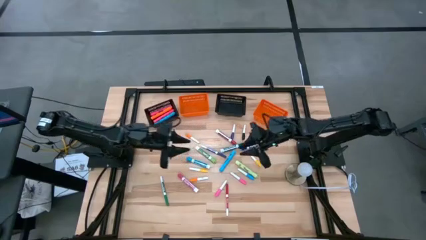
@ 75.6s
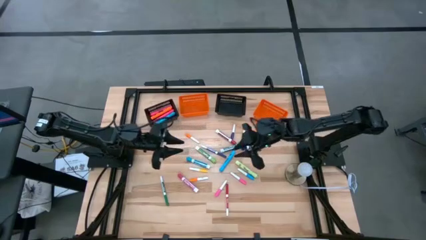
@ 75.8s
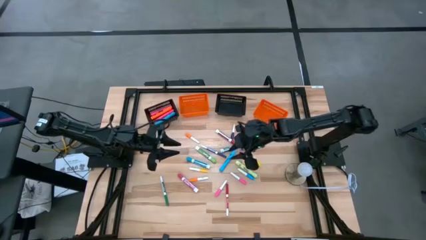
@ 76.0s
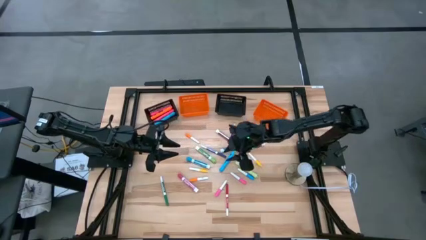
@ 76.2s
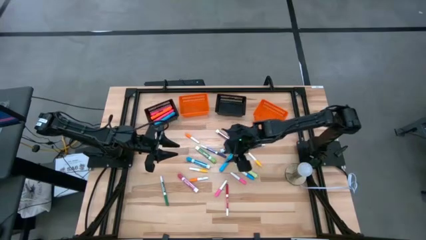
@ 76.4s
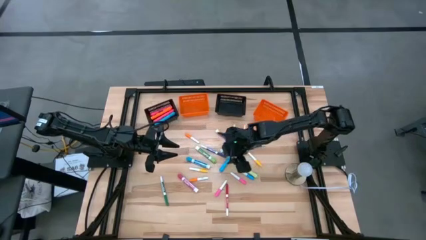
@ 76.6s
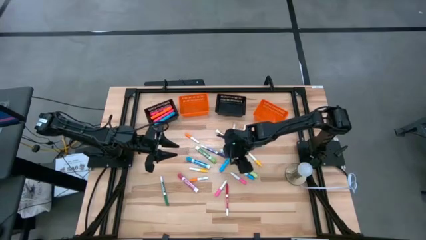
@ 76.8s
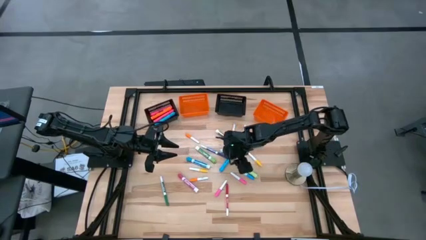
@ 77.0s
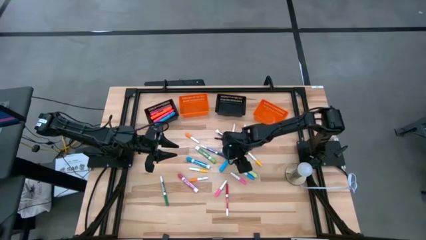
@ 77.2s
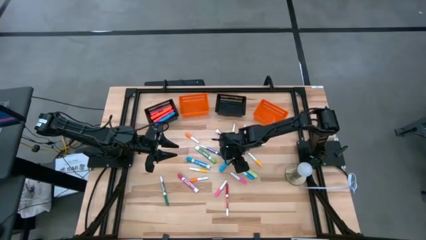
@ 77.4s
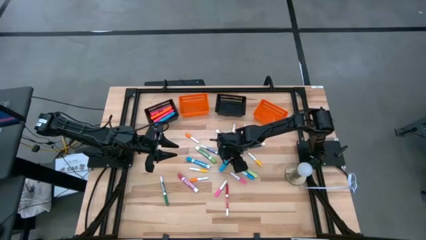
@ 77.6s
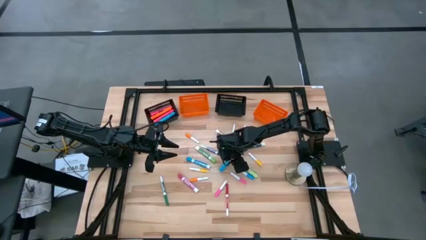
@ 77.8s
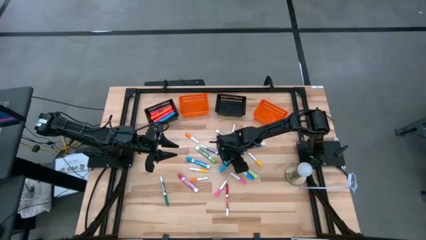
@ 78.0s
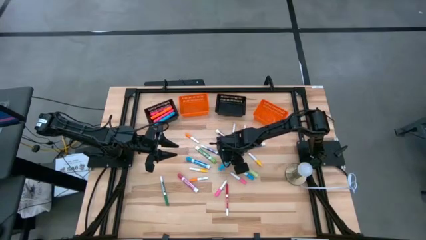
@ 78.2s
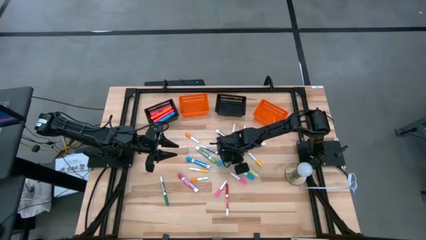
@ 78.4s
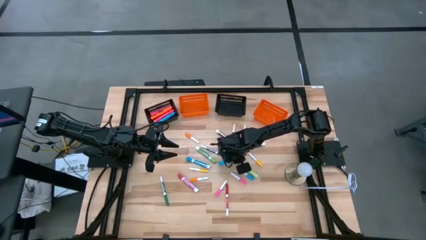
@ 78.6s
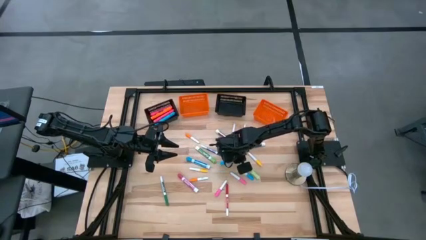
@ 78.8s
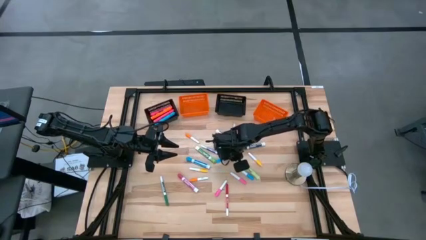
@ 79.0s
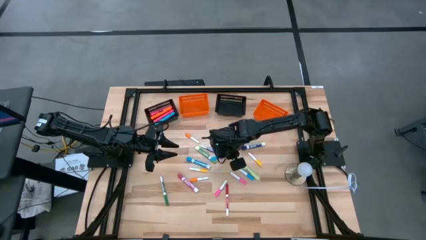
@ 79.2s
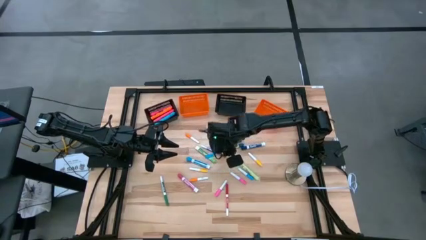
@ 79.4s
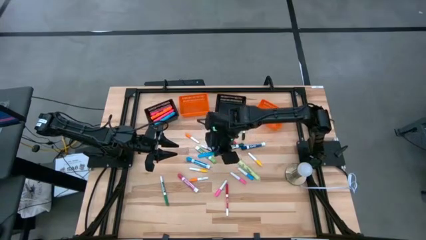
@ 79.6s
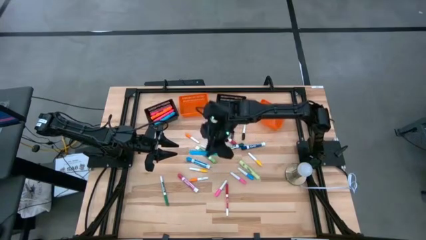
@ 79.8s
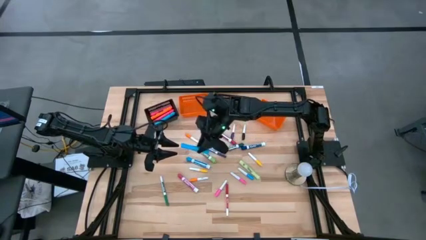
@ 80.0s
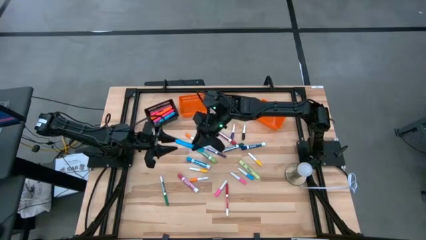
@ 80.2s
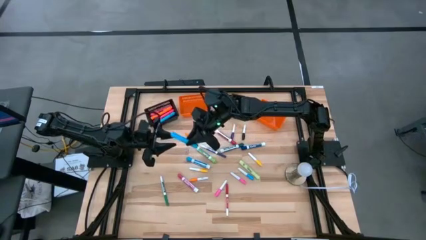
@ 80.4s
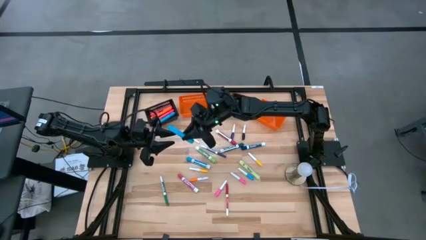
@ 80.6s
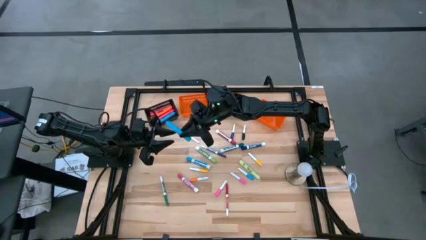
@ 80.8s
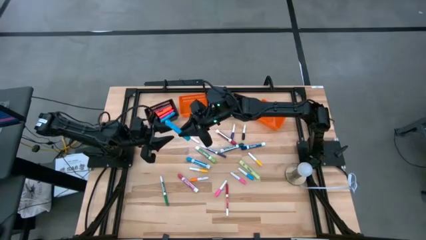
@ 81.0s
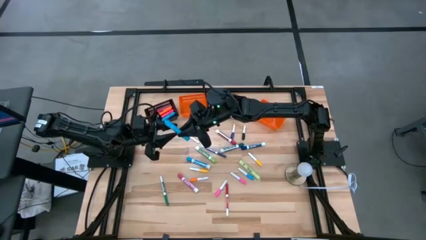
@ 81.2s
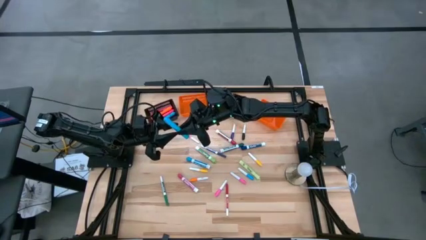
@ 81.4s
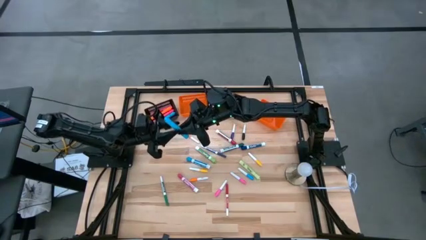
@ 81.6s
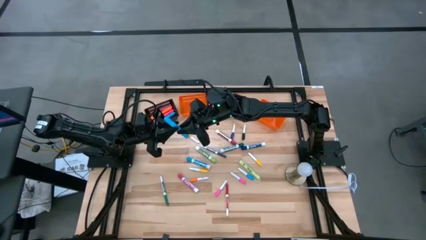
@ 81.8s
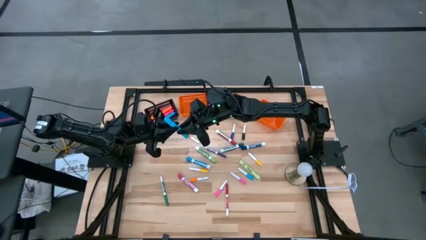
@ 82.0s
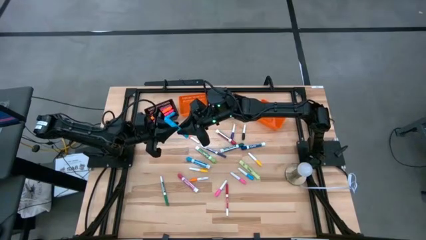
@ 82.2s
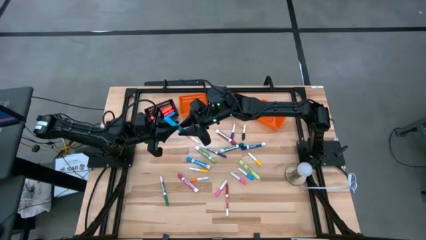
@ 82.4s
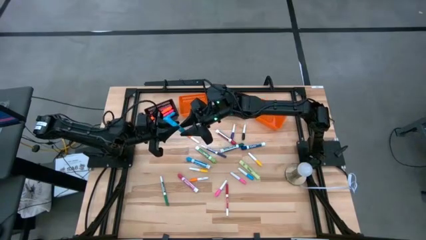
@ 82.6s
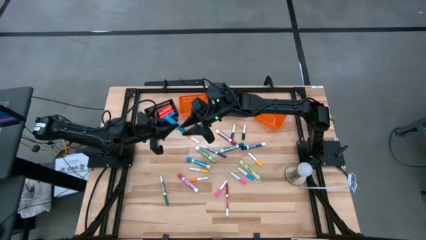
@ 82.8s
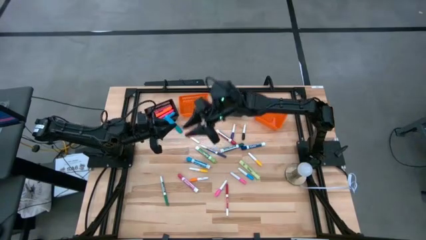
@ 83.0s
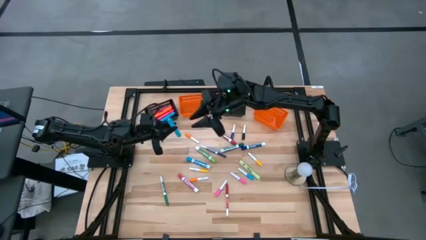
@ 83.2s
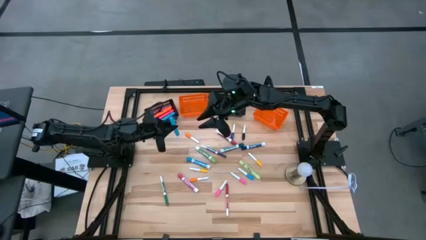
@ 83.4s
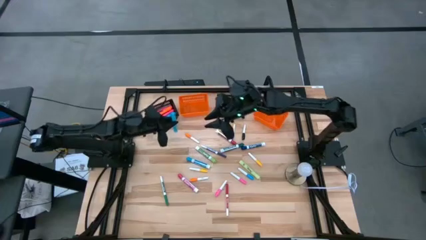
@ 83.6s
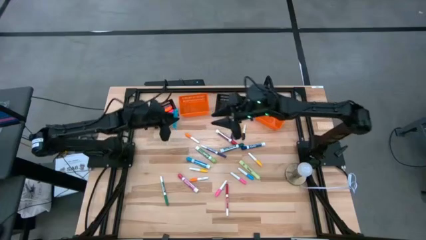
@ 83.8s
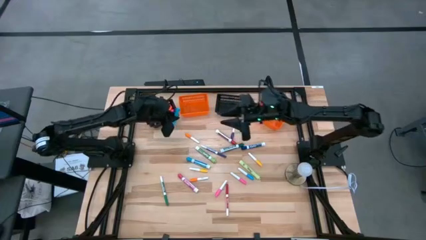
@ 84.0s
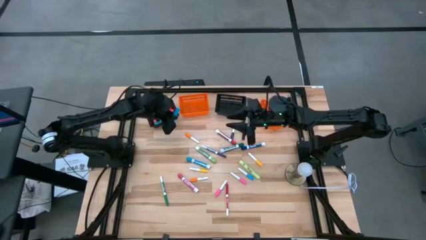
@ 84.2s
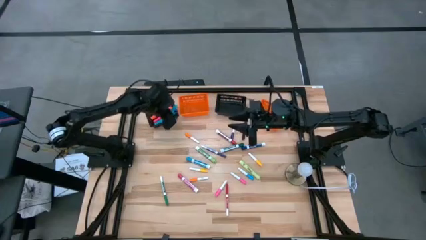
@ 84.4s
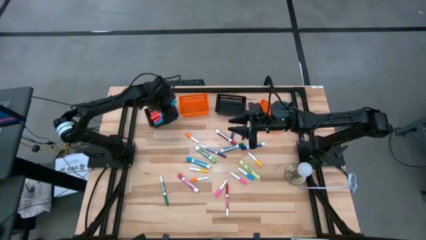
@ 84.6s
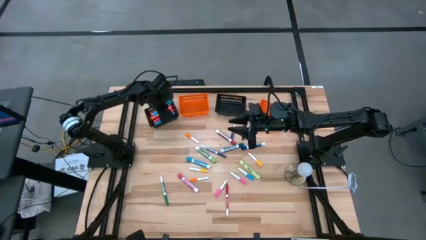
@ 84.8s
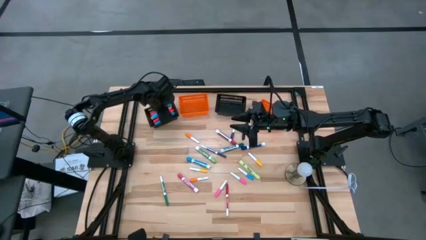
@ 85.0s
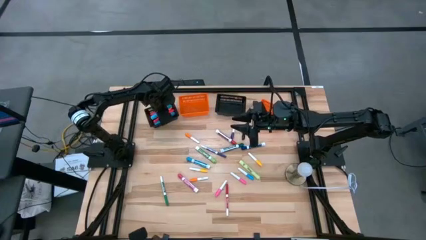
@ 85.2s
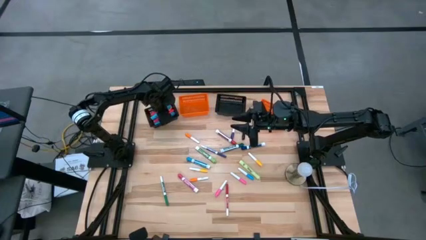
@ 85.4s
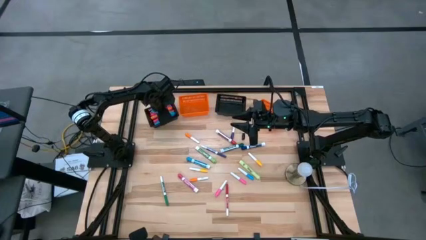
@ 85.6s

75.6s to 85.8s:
Task: Pick & Place Markers
Put the blue highlighter pen into the left black bin

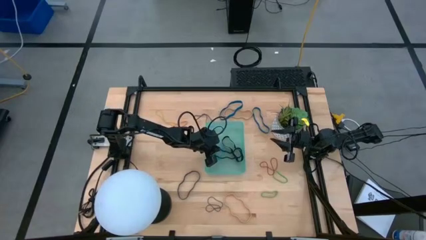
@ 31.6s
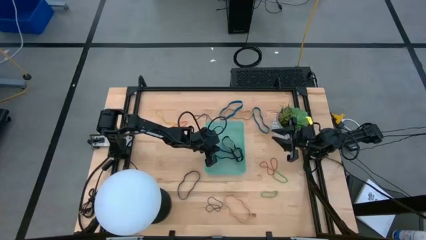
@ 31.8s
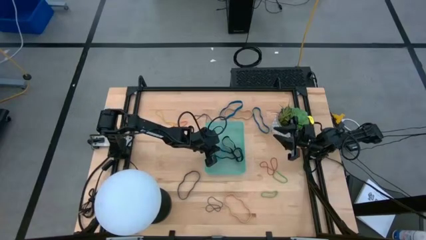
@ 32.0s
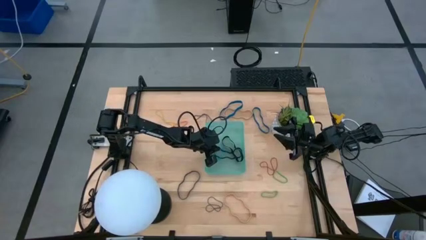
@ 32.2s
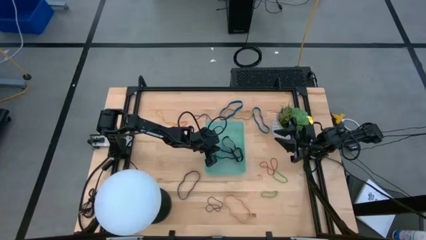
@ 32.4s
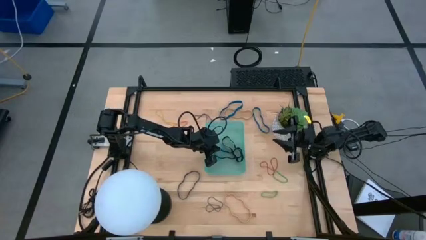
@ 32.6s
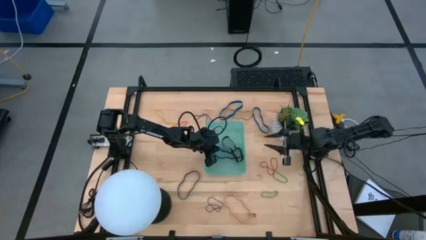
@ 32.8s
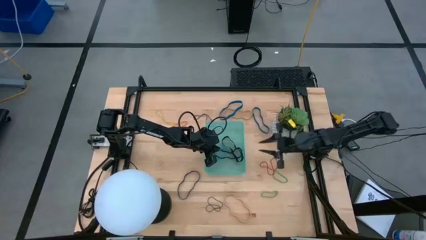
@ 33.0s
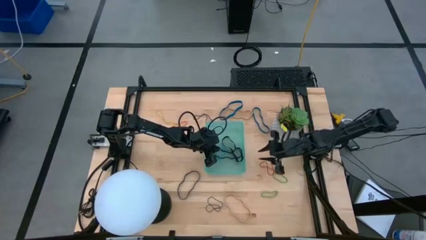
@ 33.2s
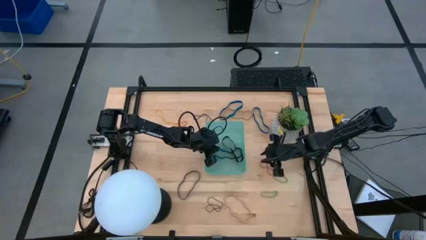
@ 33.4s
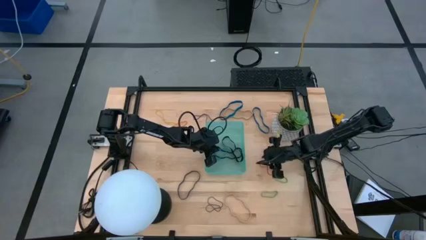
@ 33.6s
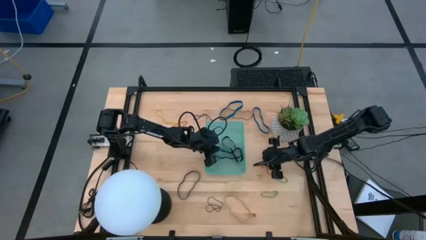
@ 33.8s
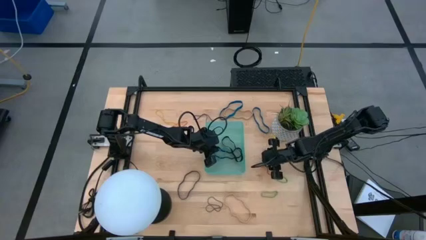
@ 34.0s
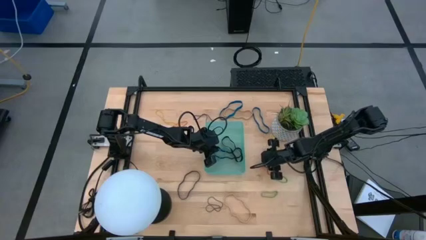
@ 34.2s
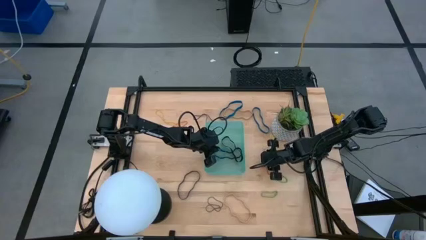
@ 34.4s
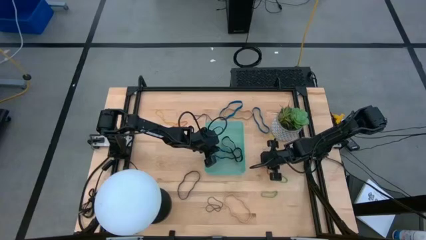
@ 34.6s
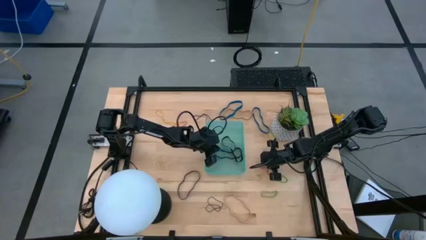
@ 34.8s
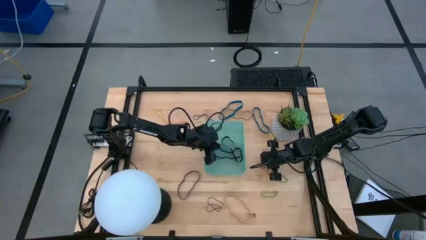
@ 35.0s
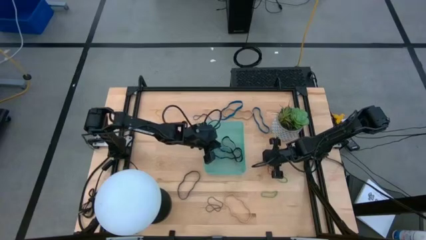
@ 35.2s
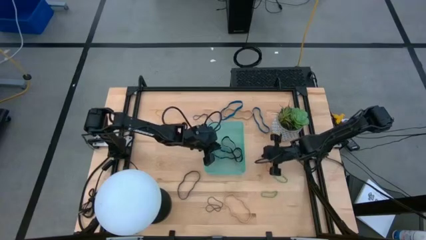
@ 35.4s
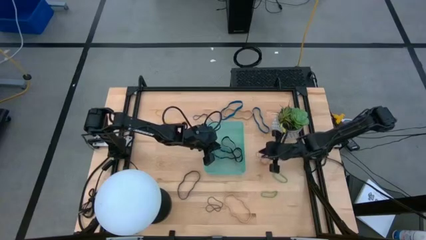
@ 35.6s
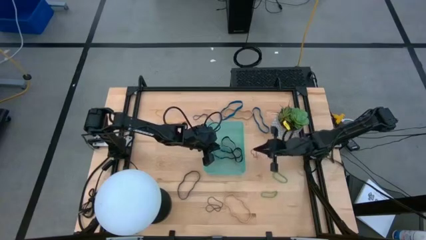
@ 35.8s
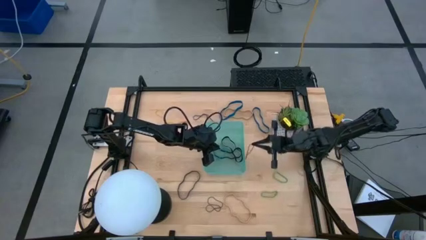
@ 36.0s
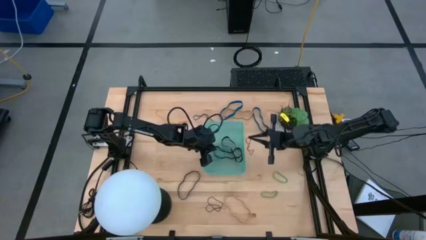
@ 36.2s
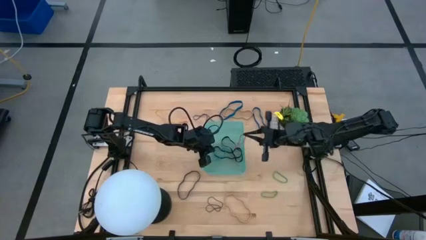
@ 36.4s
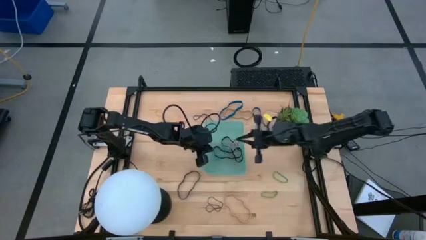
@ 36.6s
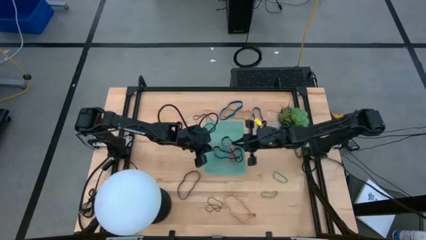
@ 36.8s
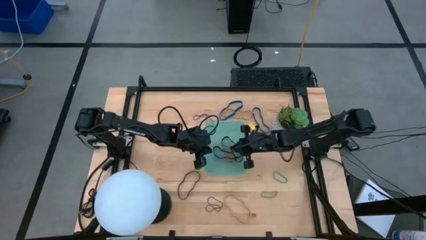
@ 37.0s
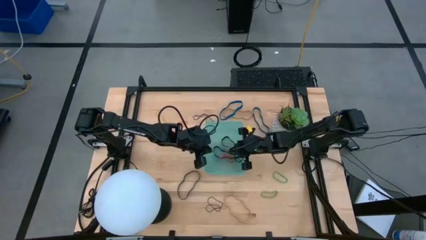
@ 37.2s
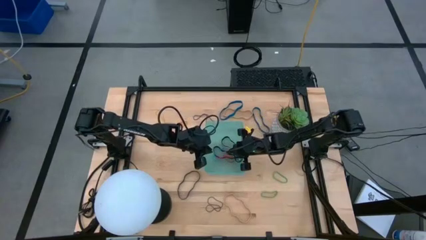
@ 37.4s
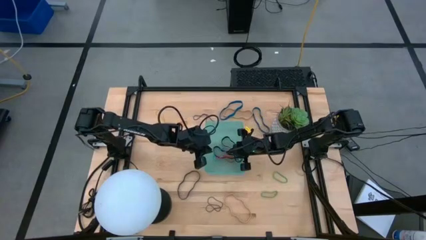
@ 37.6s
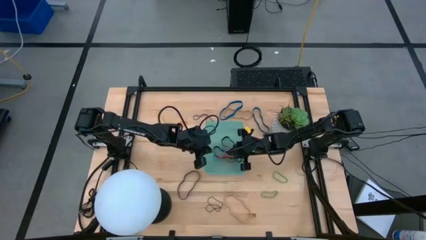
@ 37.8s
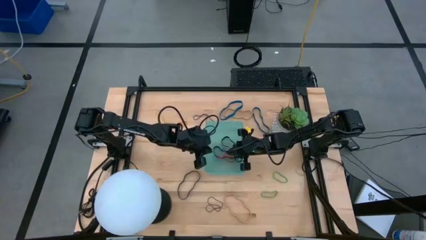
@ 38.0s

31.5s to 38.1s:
Task: Pick and place rubber bands into bin
Put the red rubber band into the green bin
